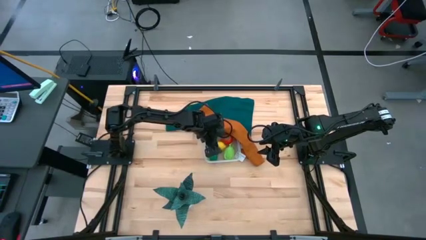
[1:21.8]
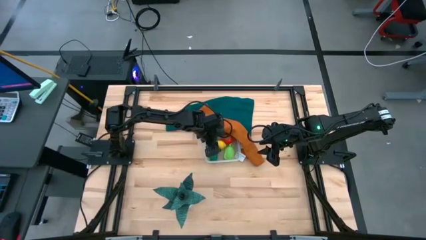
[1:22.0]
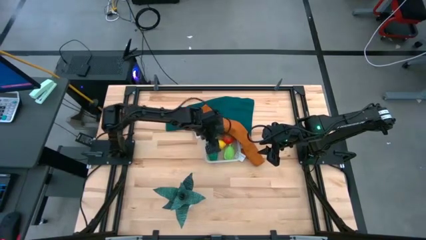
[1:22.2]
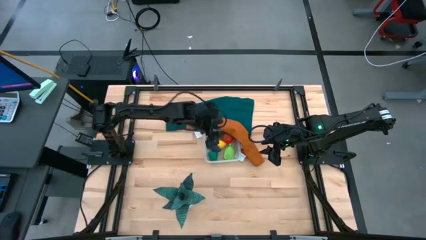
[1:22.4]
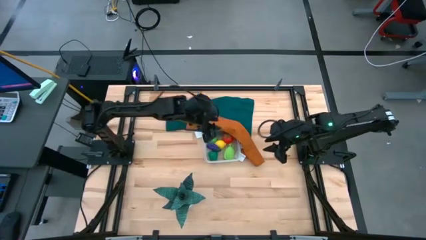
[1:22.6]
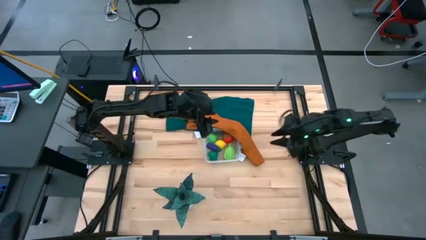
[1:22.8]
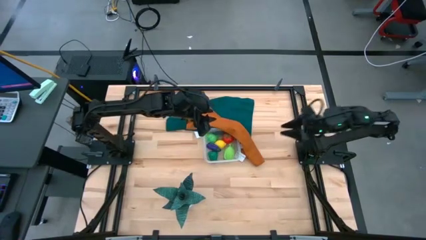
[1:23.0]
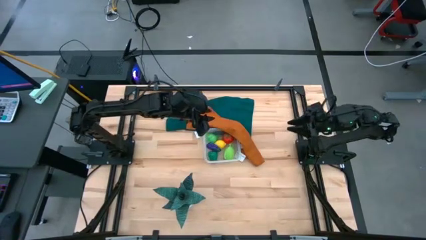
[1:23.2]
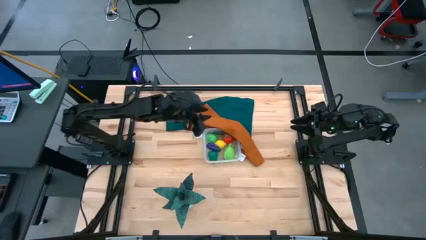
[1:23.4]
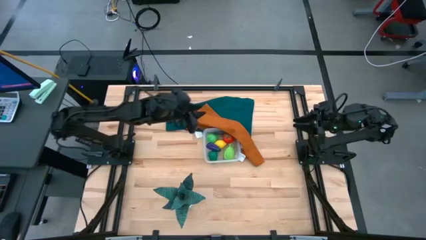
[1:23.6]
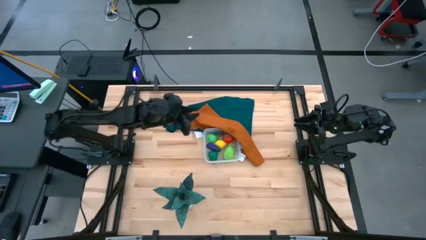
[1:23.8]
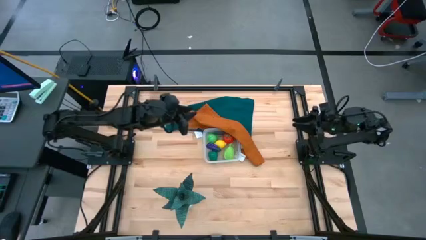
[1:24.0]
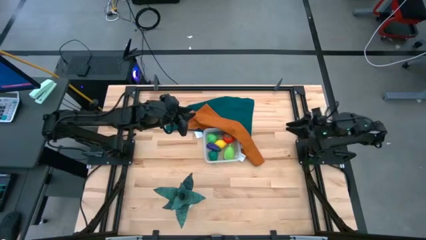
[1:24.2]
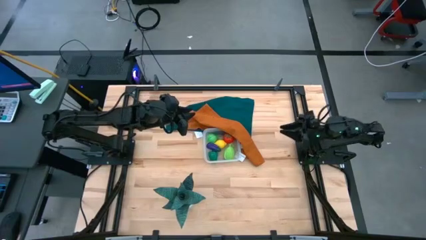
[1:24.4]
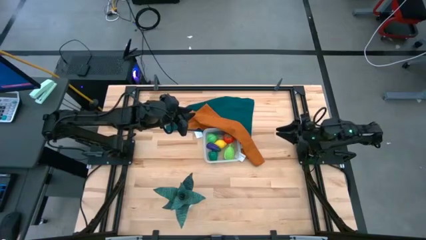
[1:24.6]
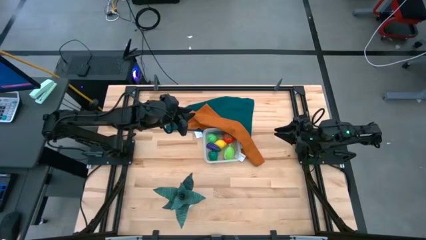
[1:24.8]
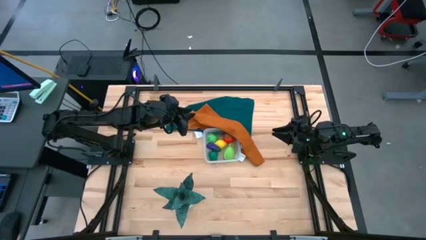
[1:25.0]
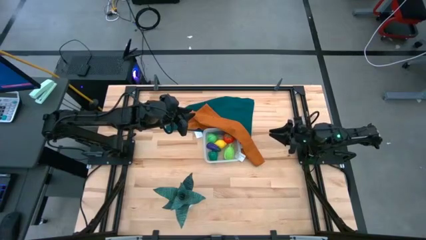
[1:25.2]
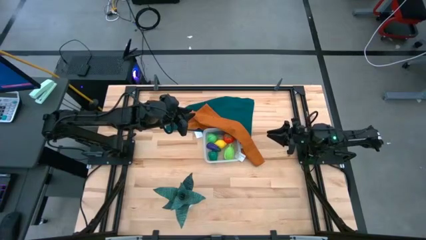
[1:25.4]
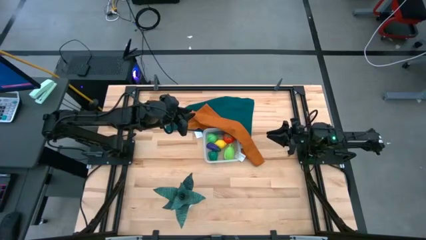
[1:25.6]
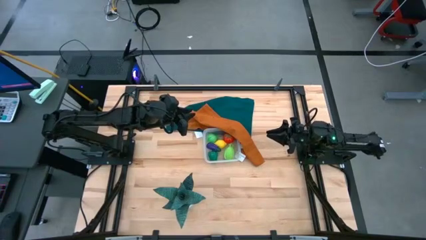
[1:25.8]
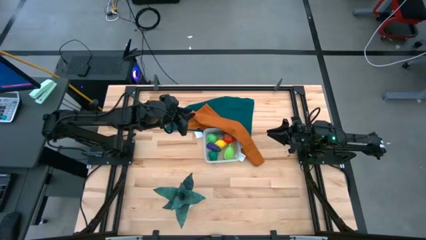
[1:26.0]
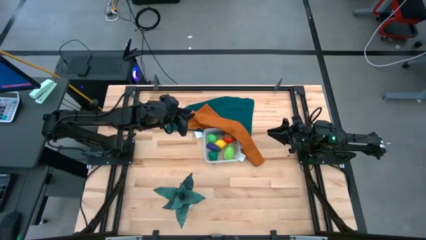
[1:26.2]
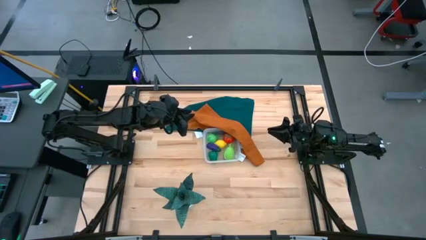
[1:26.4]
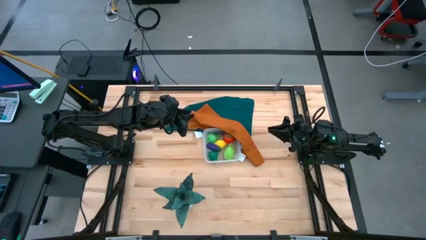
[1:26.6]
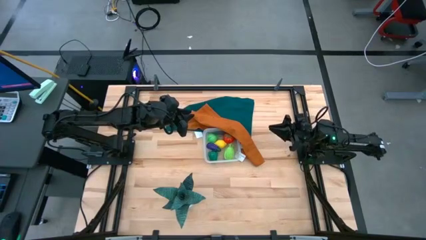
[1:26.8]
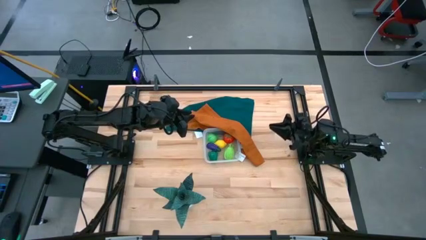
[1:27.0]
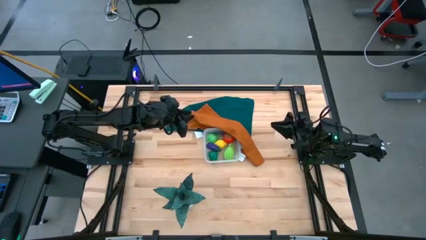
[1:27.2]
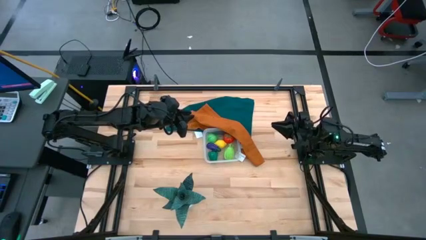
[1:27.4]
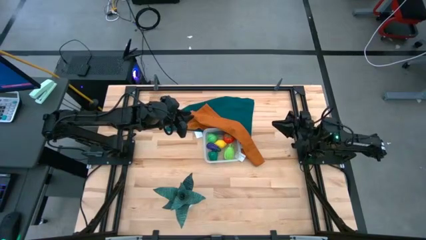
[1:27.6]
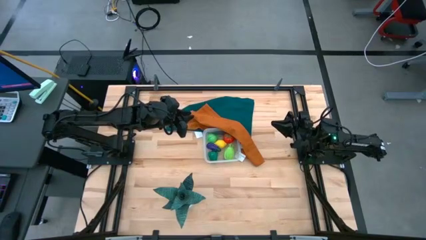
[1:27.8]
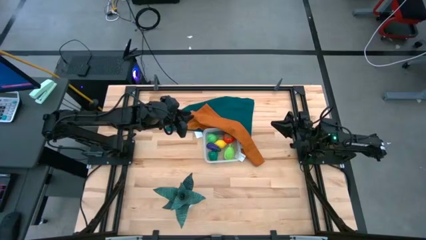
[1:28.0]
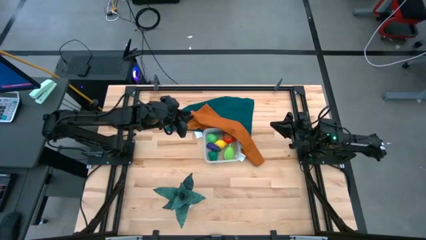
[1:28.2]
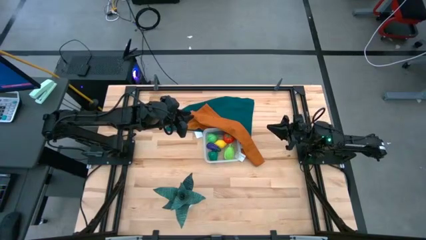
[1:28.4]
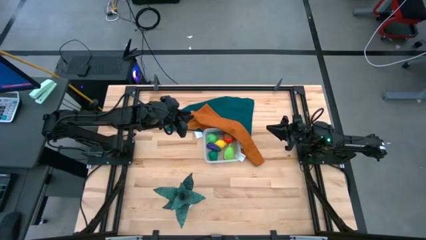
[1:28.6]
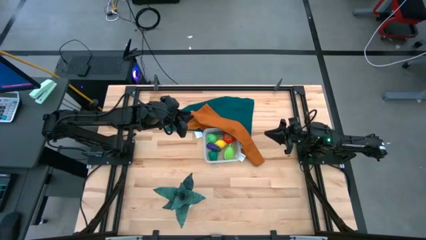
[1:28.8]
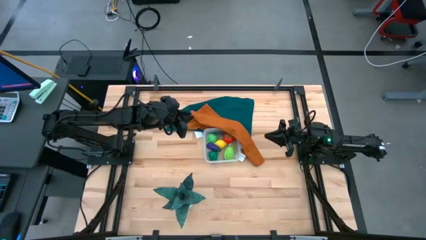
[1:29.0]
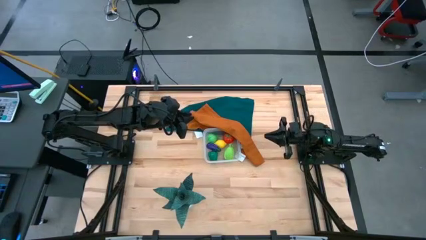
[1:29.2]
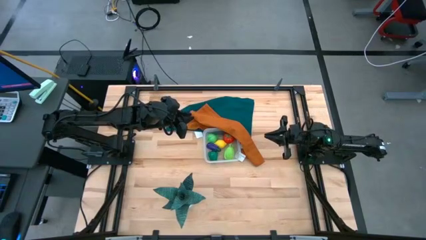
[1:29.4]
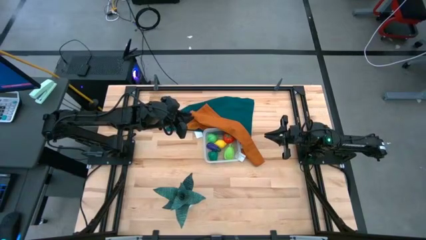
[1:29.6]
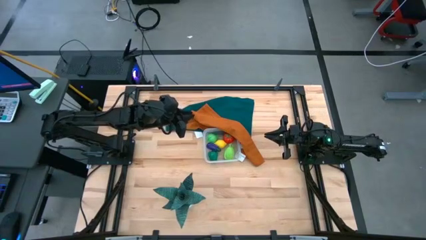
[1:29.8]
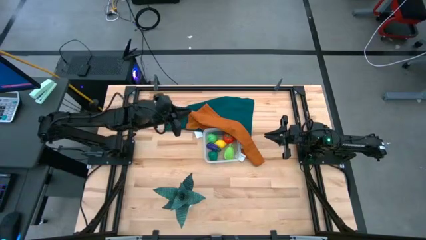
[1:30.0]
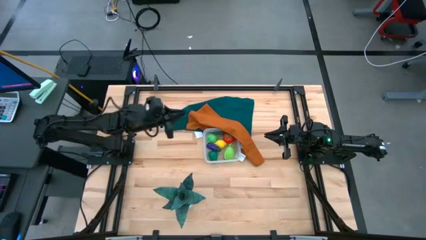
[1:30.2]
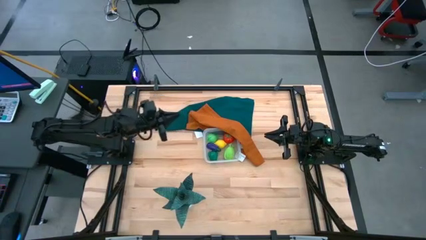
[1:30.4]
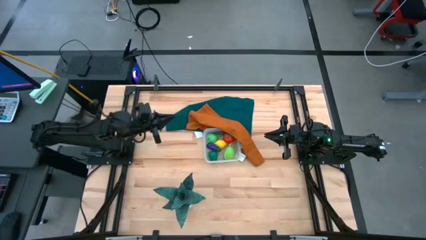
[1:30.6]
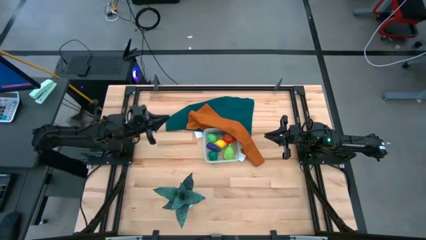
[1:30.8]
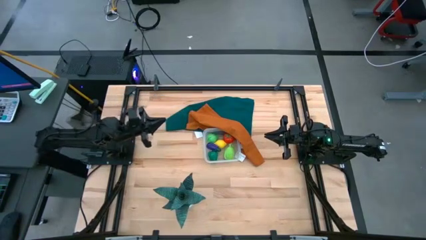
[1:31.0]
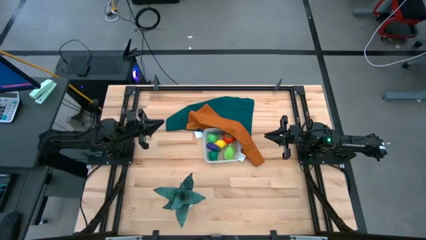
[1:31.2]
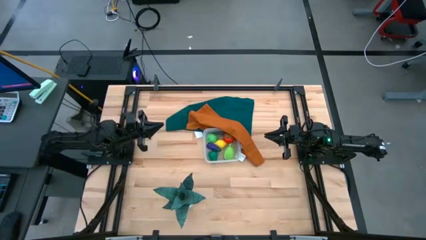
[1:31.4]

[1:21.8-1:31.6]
Task: Pick and placing Produce into tupperware
Return to Home Position

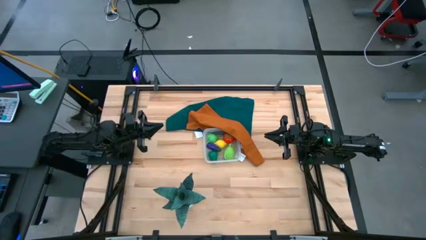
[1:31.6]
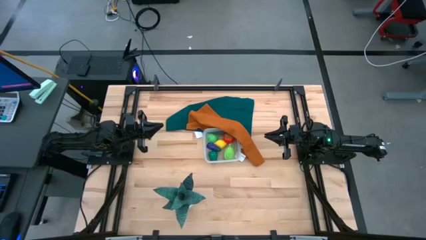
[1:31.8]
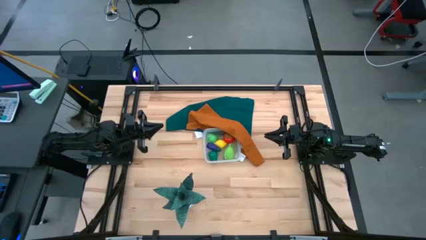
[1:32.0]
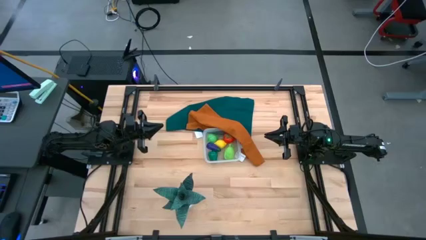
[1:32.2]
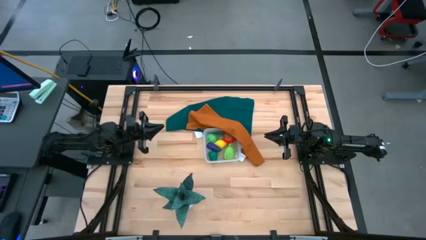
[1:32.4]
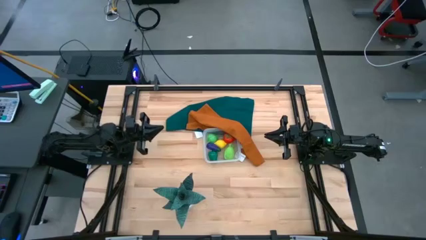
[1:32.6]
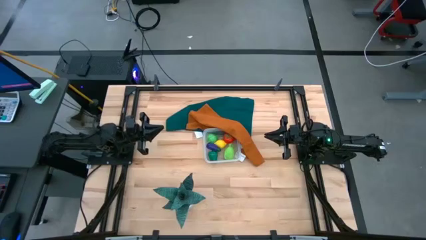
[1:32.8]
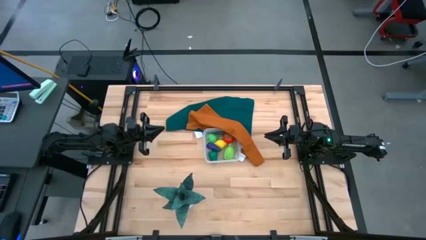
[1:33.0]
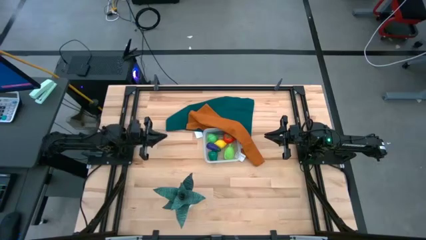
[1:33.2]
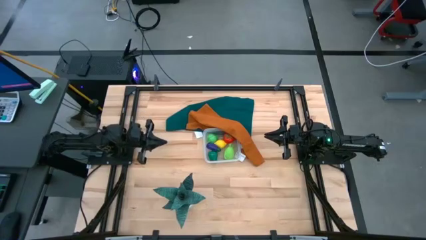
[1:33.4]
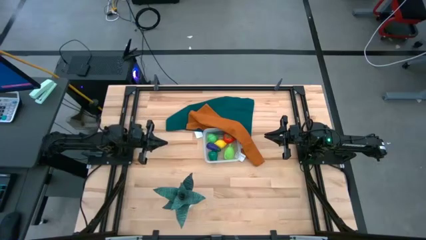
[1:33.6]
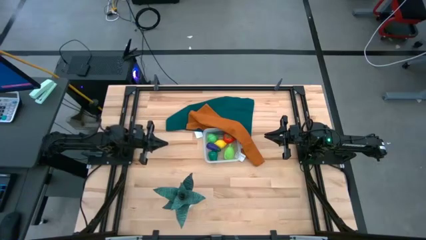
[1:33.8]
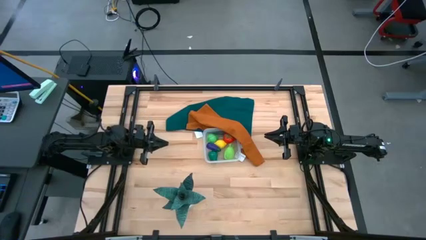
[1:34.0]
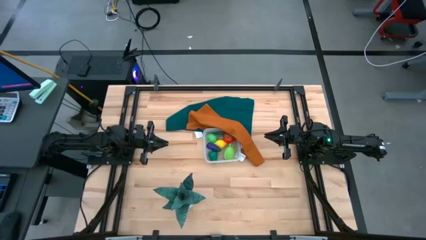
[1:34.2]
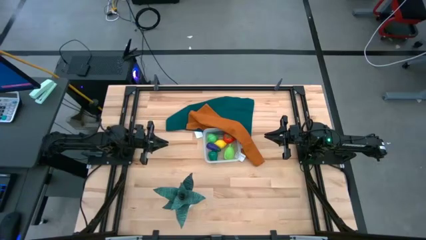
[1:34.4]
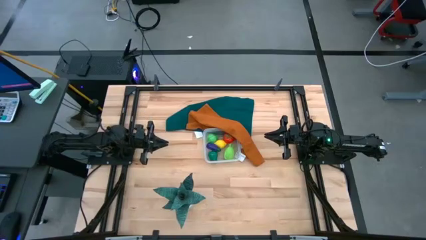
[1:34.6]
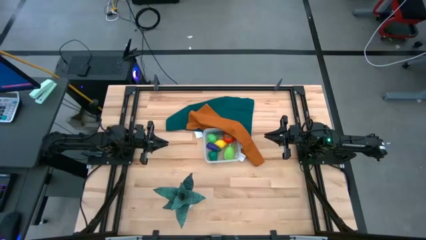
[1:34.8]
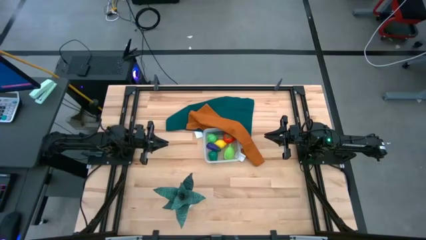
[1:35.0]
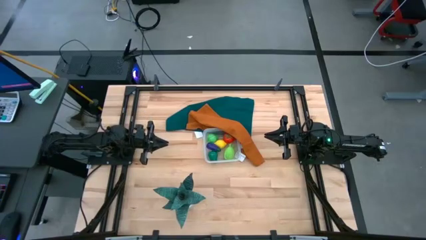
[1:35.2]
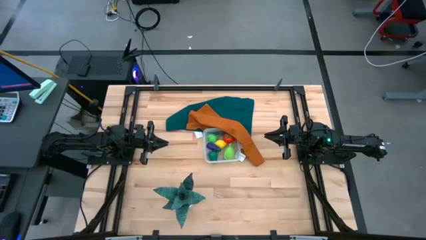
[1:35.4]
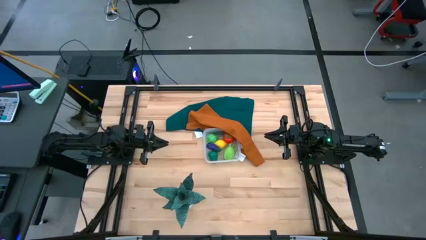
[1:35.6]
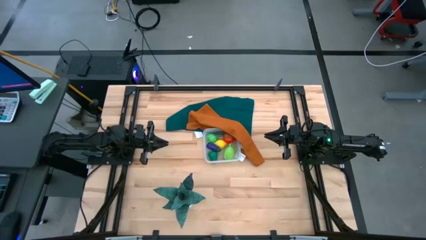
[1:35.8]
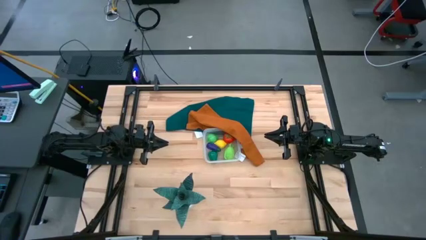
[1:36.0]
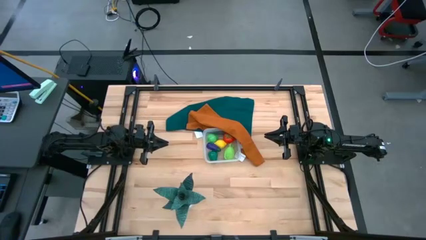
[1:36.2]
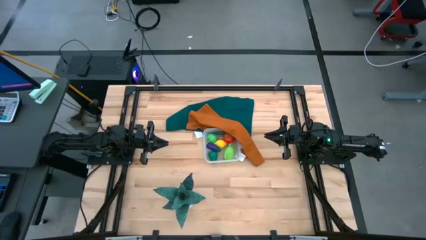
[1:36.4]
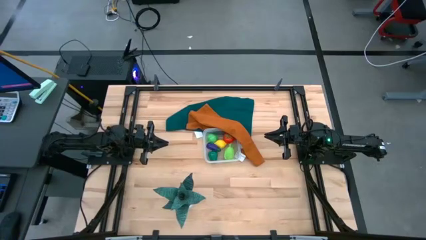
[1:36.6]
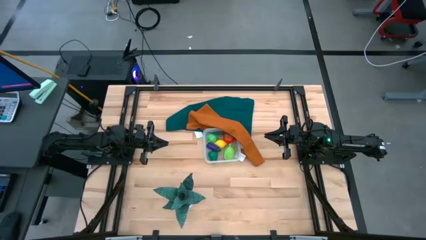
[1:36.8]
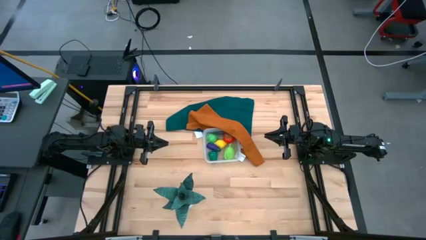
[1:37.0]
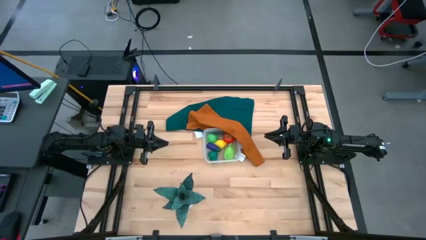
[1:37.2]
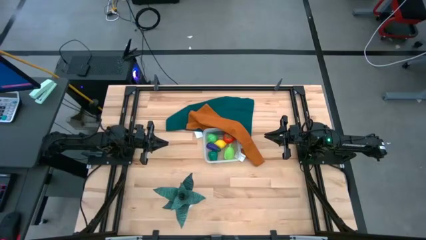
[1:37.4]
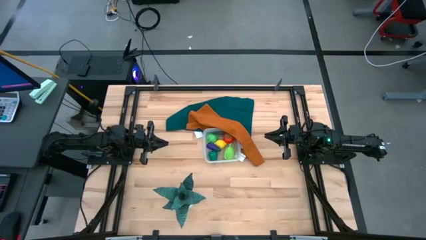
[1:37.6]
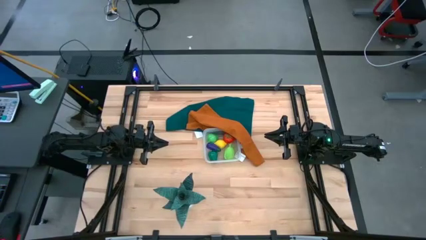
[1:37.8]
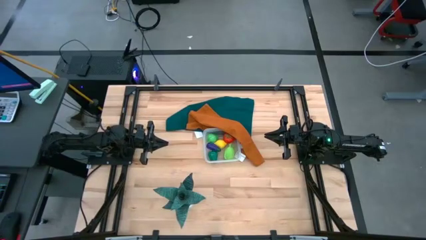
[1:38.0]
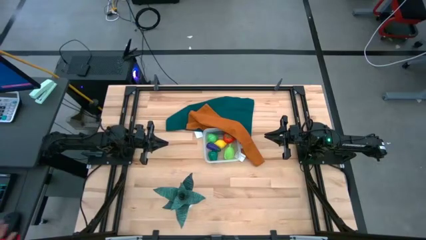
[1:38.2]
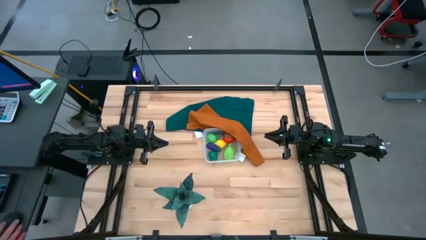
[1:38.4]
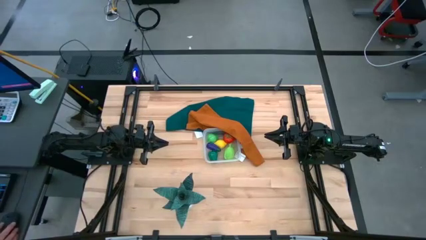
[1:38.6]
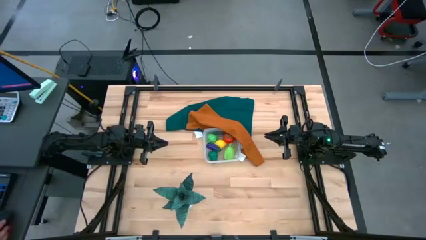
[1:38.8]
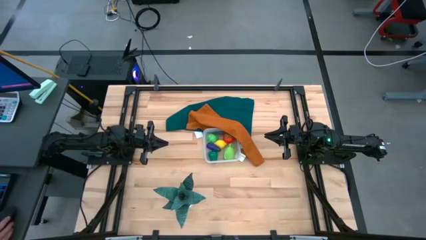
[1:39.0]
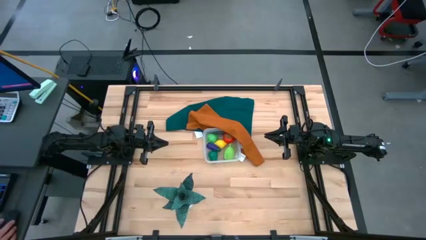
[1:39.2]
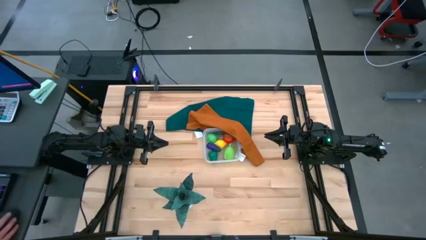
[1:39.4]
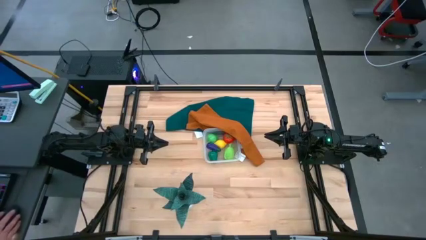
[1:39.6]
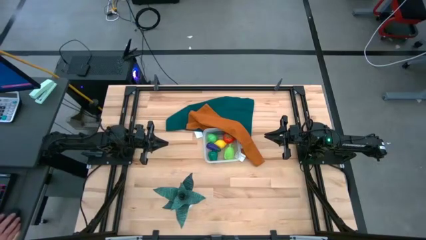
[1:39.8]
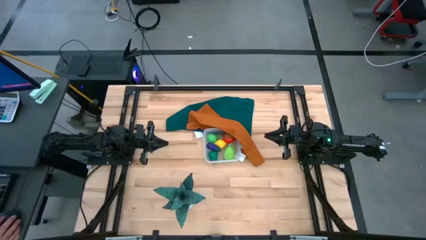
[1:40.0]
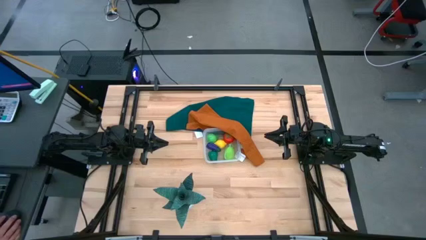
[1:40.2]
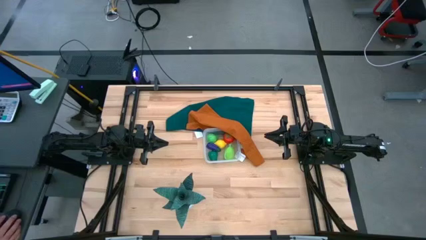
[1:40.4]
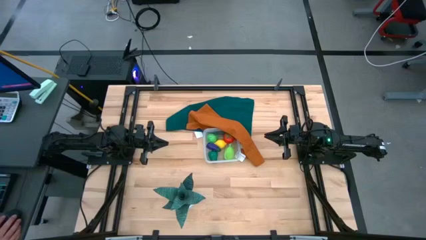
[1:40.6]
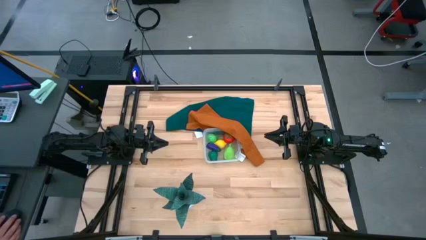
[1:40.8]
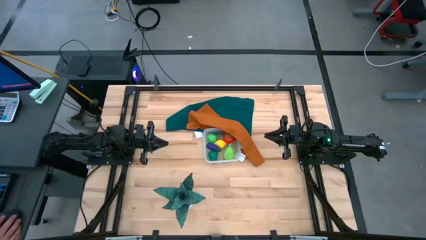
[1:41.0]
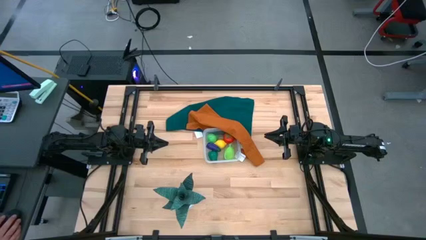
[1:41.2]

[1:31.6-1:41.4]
Return to Home Position
